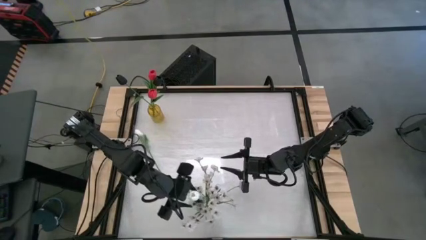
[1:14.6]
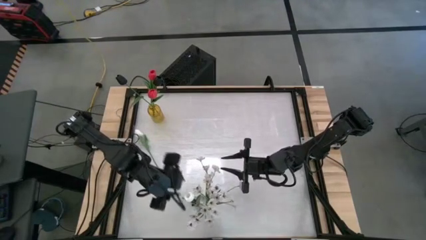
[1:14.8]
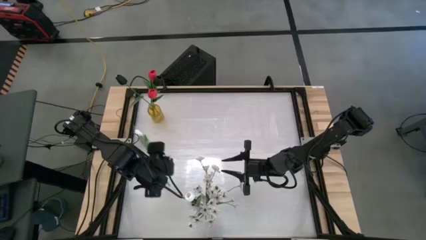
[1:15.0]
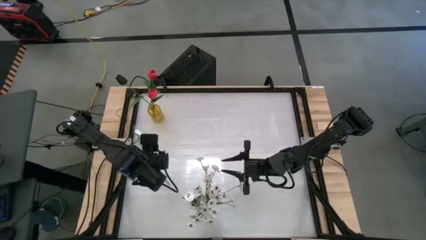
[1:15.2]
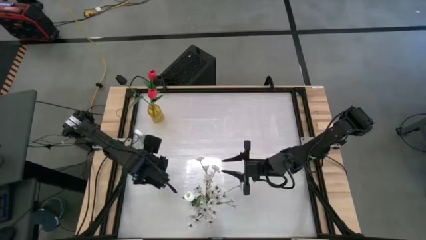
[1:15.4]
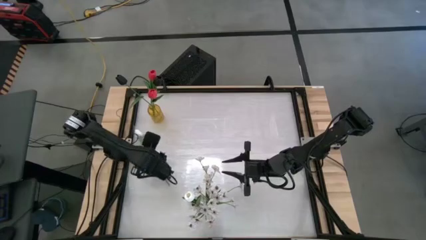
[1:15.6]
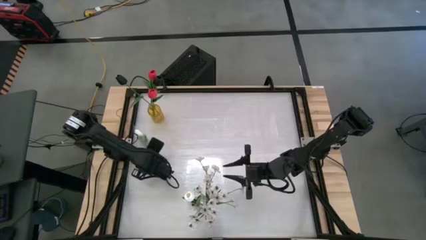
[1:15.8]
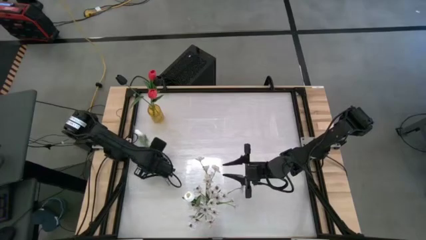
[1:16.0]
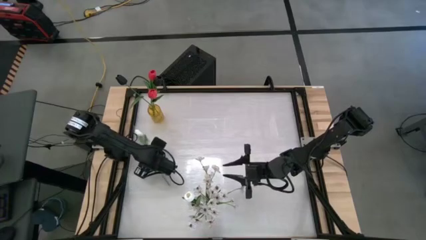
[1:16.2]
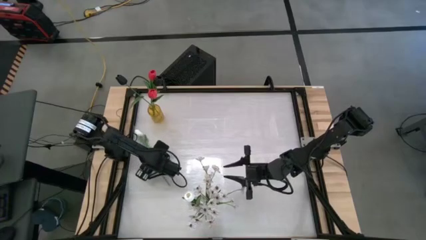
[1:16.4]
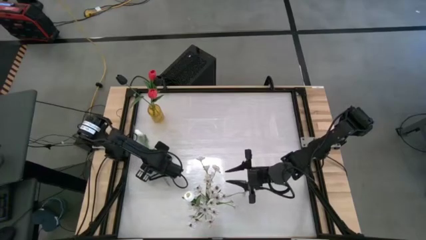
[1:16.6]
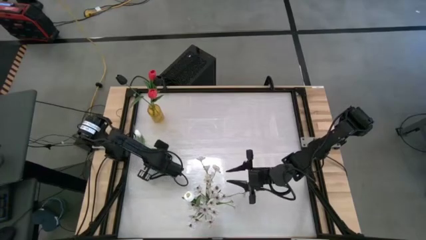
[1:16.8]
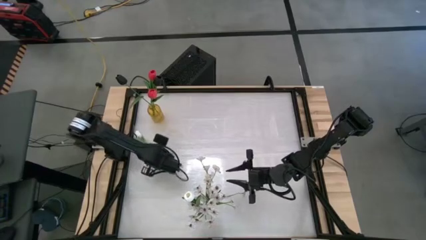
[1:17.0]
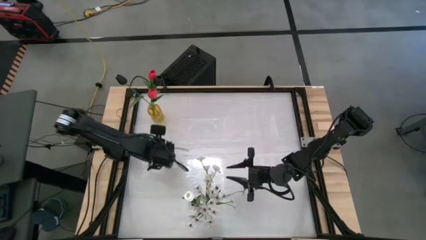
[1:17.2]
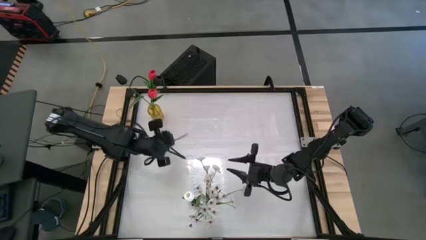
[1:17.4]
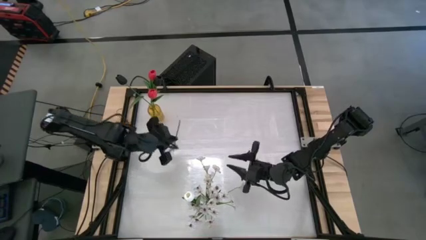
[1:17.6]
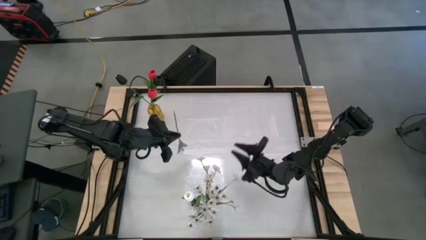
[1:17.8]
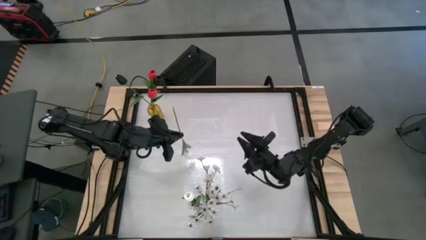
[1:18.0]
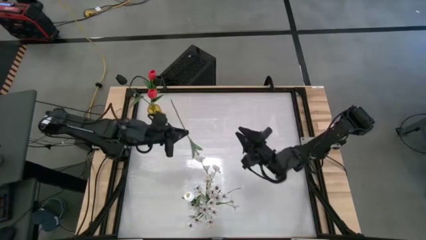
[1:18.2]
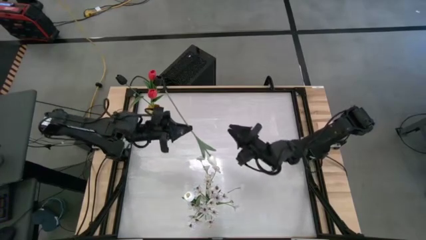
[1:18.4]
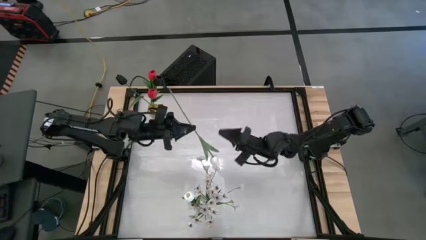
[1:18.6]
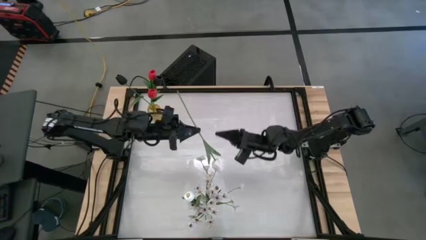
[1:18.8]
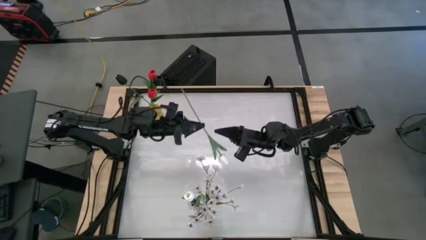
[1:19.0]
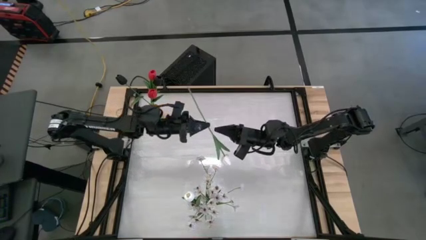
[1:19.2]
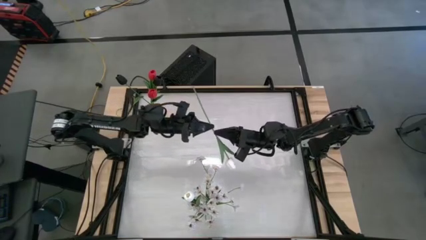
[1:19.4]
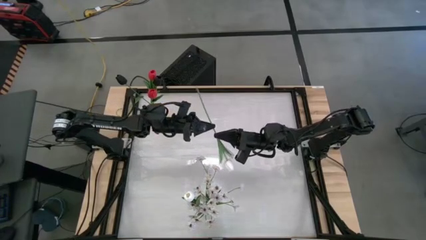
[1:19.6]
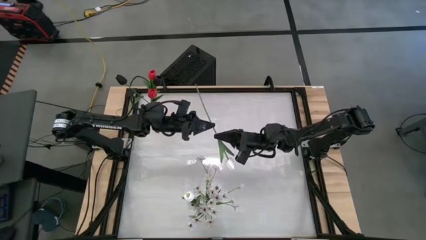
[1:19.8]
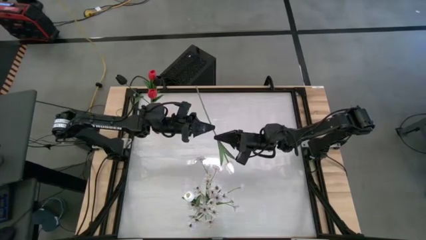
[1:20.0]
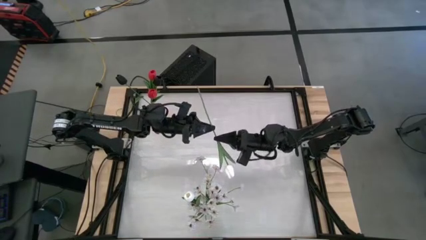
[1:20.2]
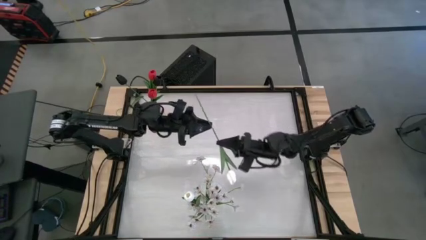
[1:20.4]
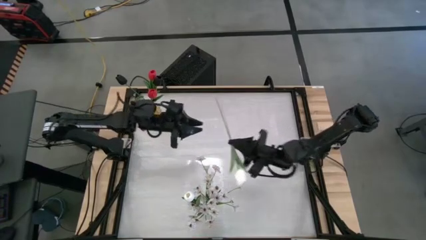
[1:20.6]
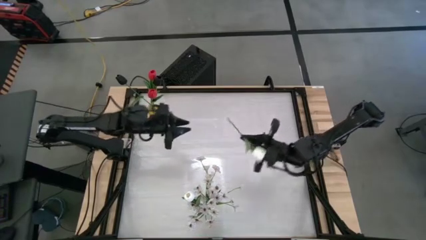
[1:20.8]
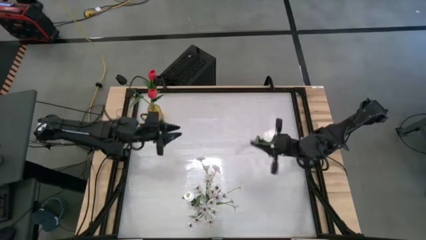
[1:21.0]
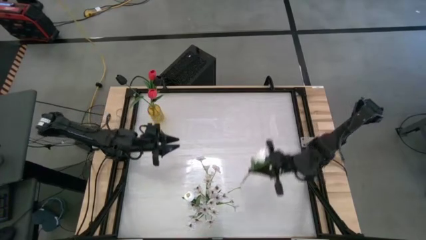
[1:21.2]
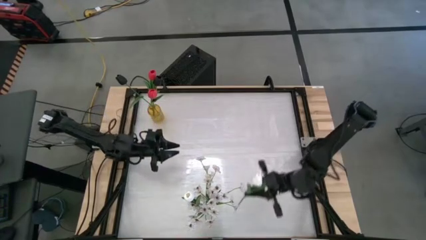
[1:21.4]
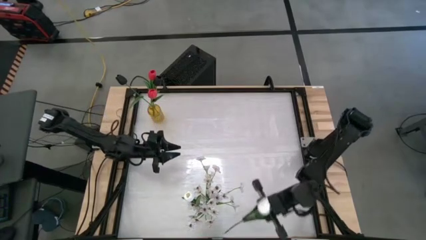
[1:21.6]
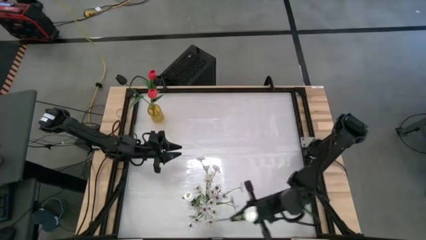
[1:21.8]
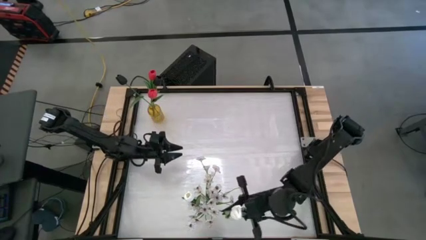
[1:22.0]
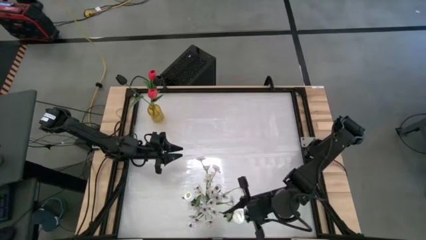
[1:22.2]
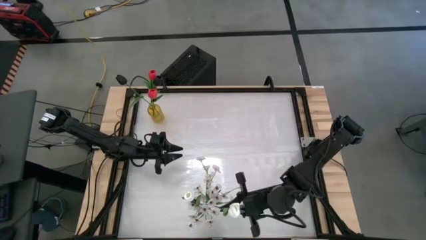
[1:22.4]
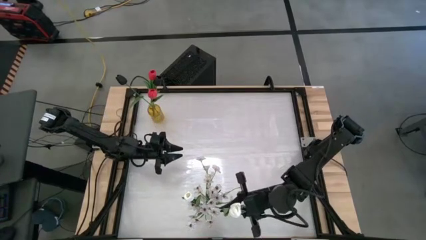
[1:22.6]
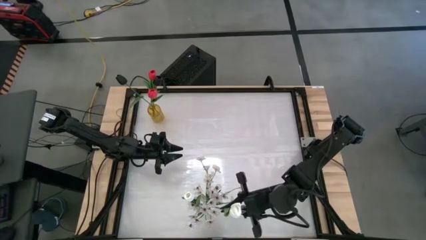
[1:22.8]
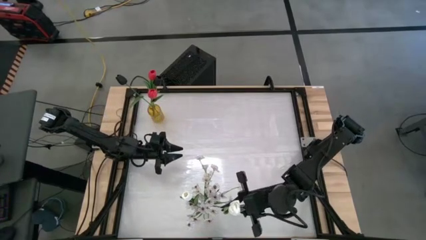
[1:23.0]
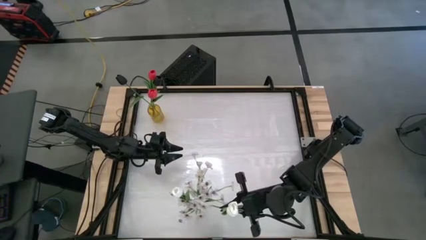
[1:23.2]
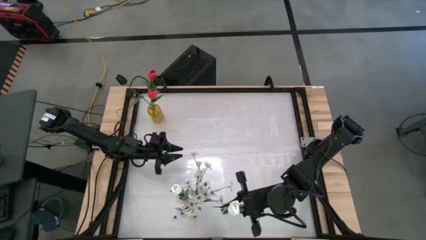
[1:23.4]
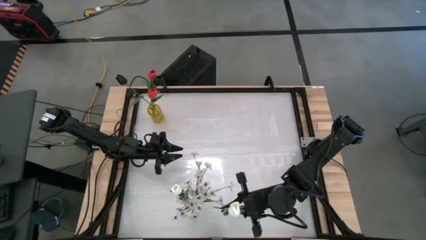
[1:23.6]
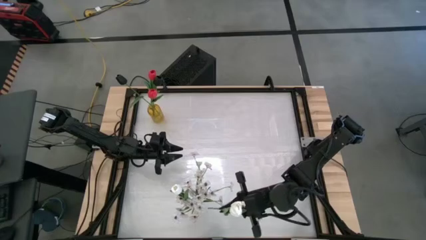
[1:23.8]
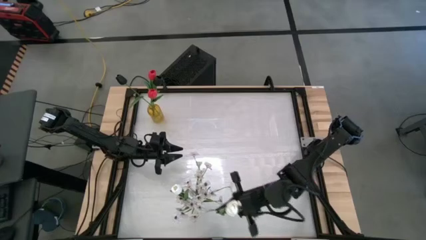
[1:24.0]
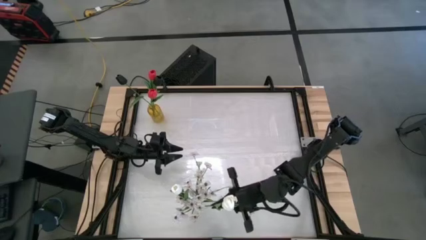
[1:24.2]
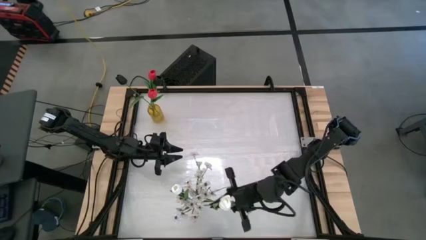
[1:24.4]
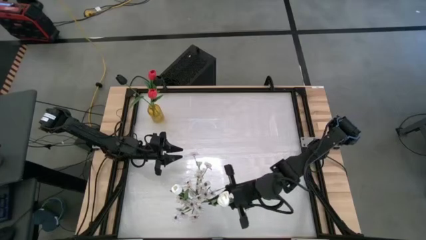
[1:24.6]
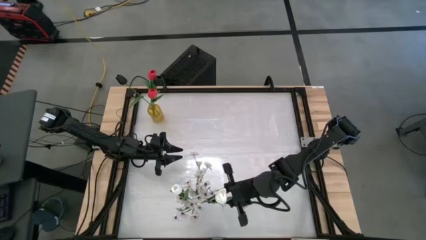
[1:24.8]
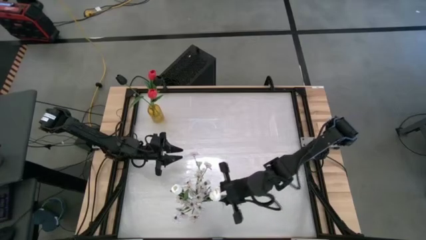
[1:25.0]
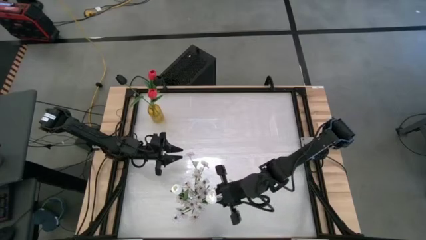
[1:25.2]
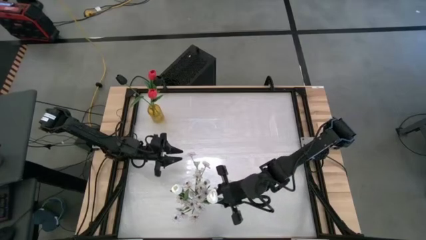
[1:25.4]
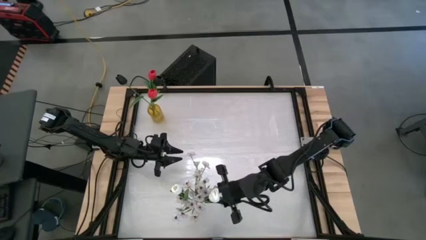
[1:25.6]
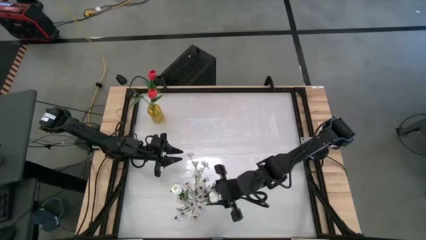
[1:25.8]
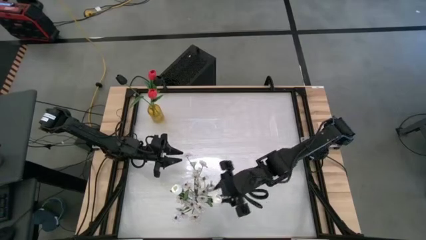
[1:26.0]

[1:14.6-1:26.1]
Task: Sort flowers into vase by color
Put the white tulip into the transparent vase

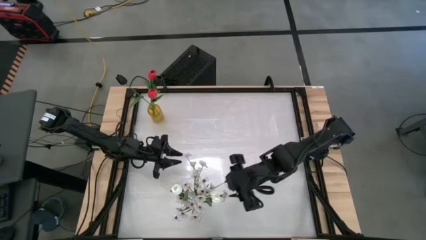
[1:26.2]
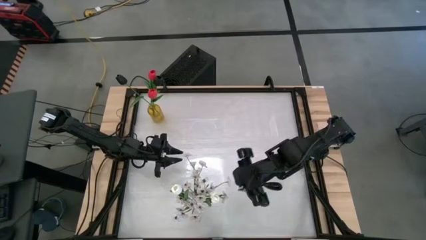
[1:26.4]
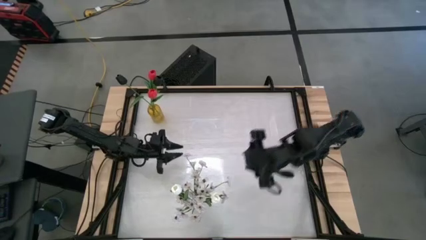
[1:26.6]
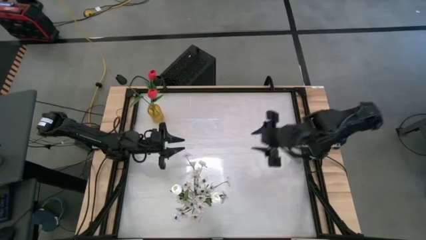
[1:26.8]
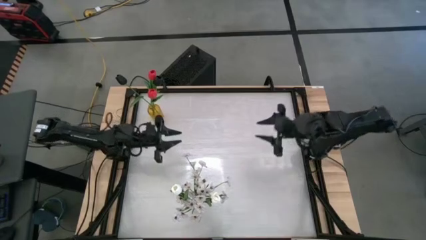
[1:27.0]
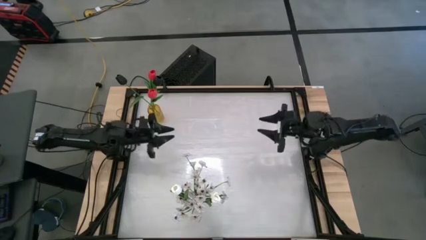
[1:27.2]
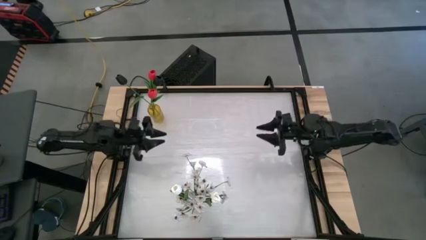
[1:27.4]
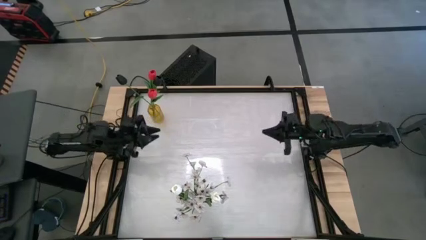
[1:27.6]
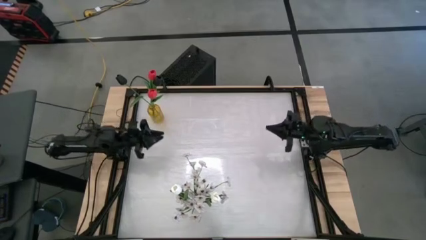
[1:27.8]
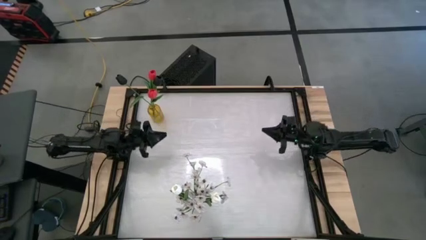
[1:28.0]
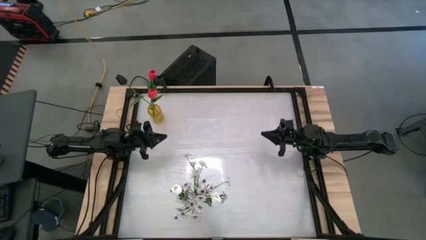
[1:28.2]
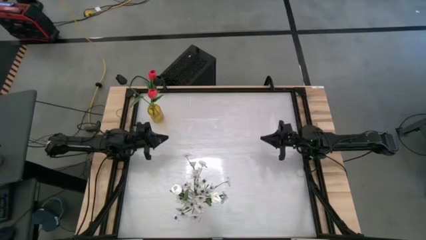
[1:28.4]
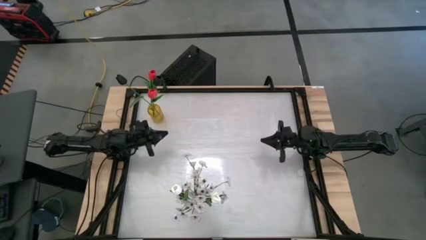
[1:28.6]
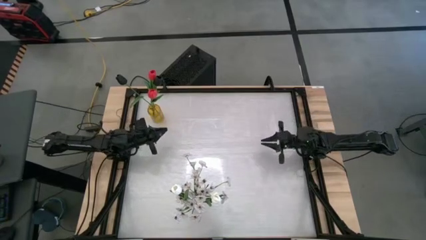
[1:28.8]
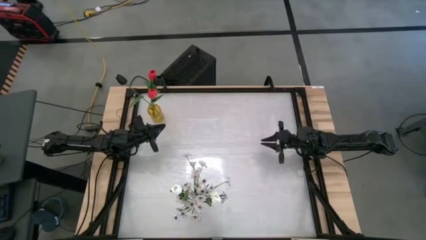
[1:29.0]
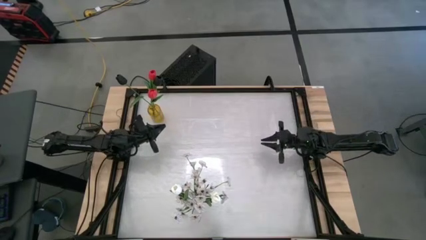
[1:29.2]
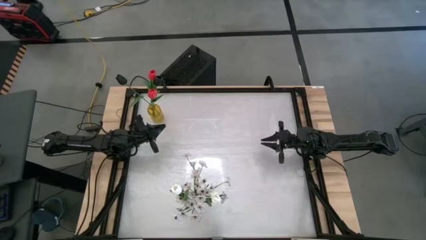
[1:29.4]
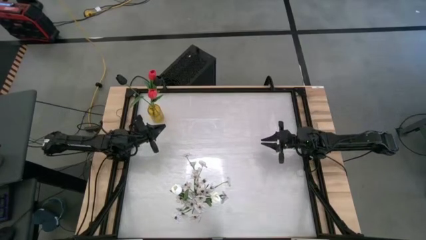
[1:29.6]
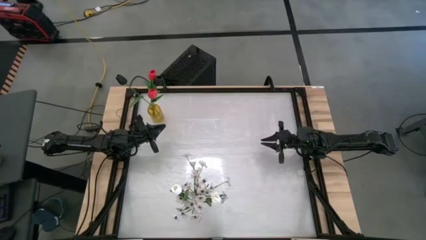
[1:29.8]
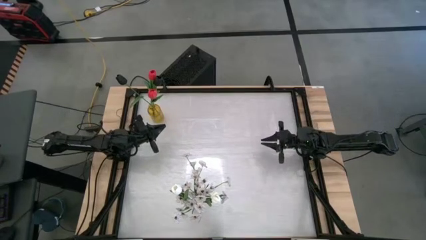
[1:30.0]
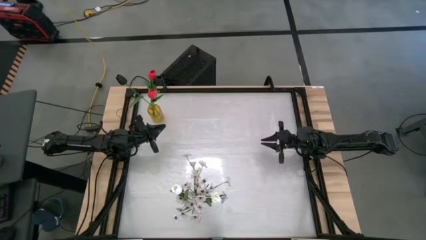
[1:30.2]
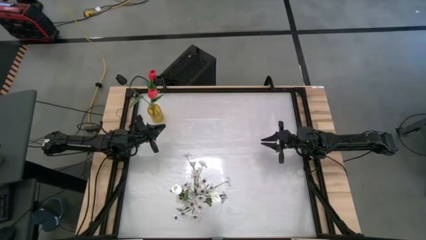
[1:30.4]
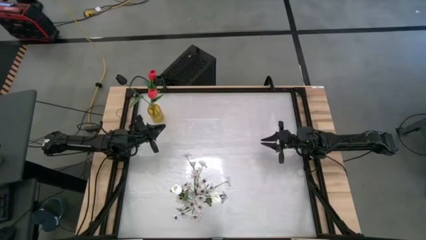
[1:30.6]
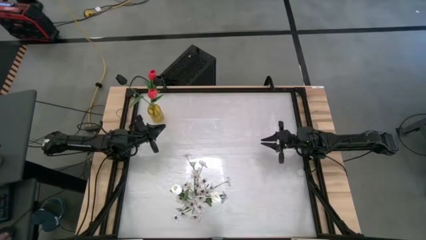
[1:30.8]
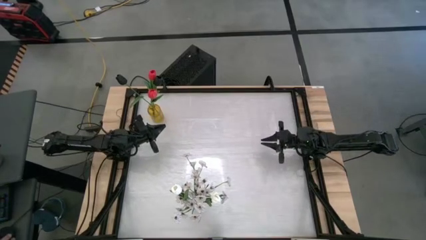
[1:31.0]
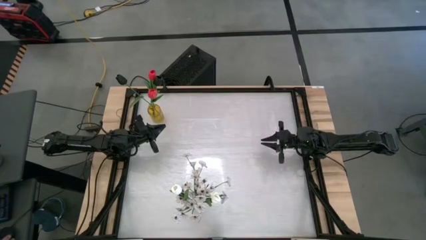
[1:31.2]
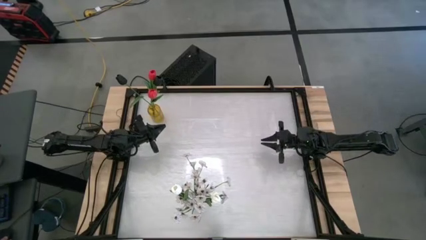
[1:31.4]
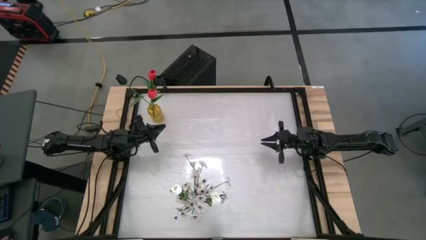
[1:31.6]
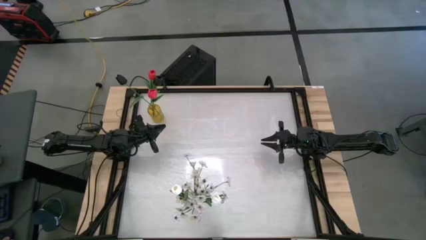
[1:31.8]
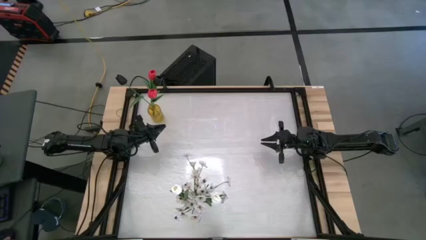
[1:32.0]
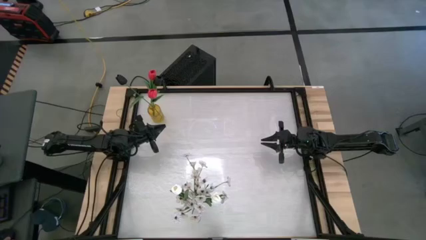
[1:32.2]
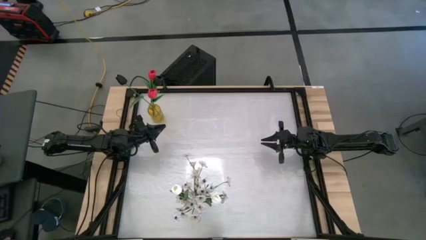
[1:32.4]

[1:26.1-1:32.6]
Return to Home Position
